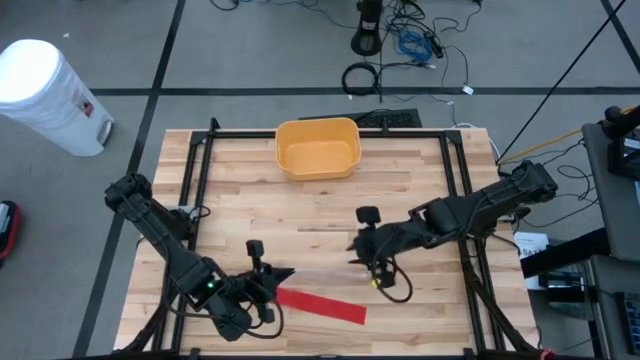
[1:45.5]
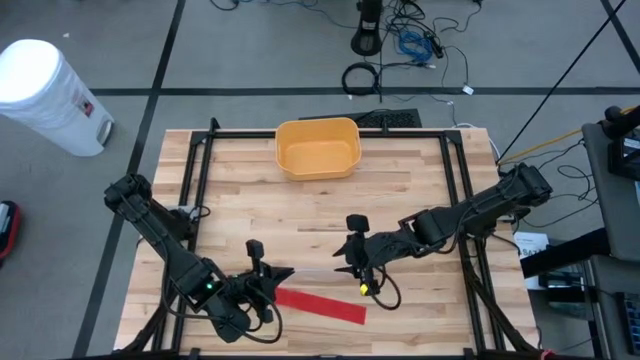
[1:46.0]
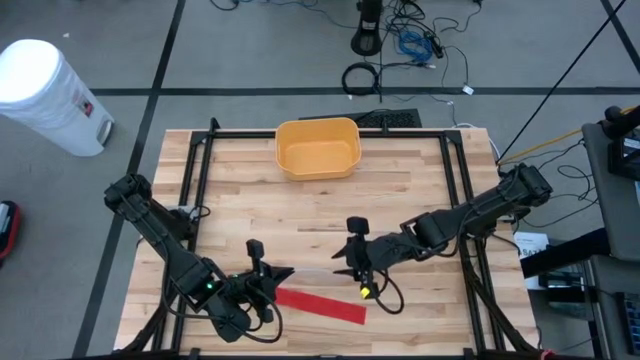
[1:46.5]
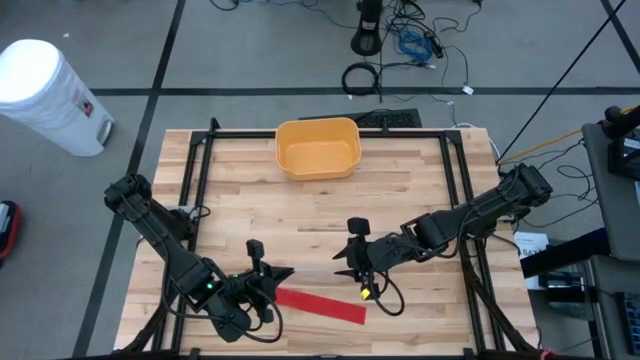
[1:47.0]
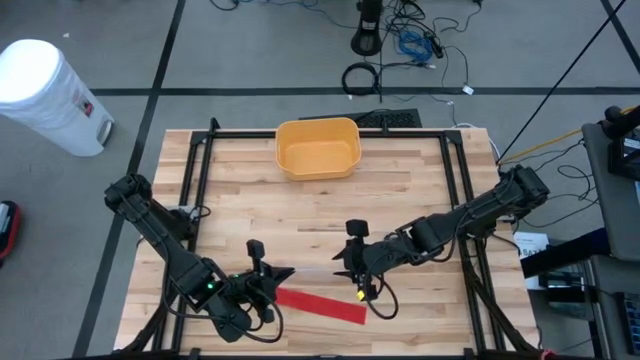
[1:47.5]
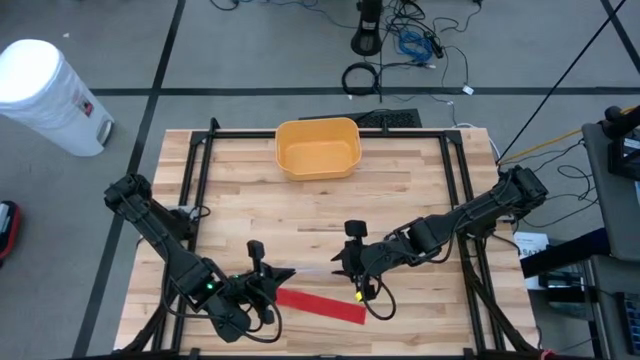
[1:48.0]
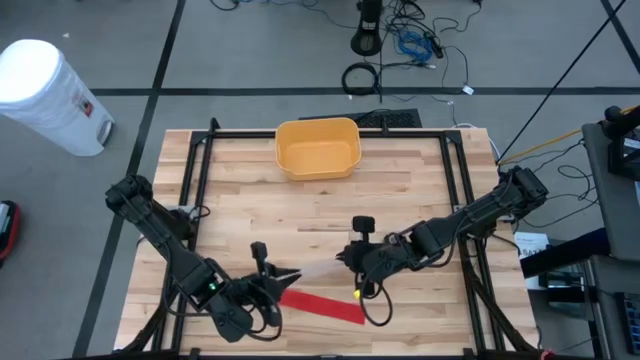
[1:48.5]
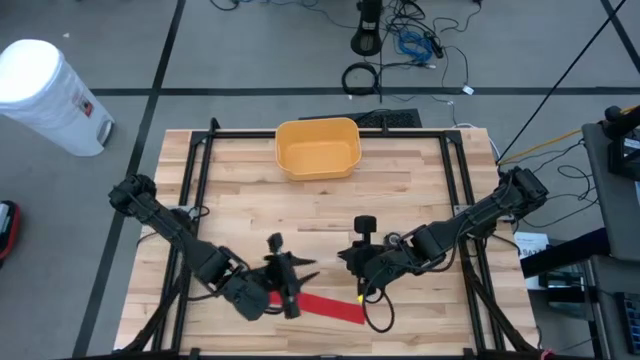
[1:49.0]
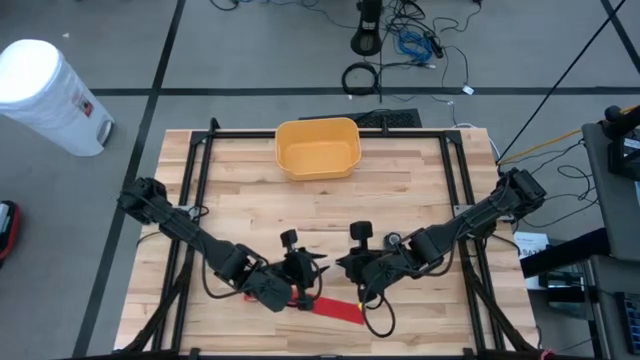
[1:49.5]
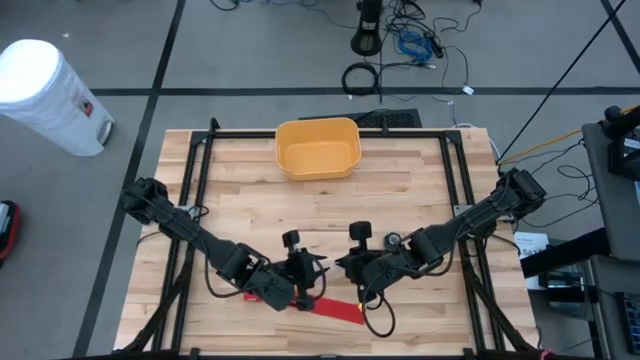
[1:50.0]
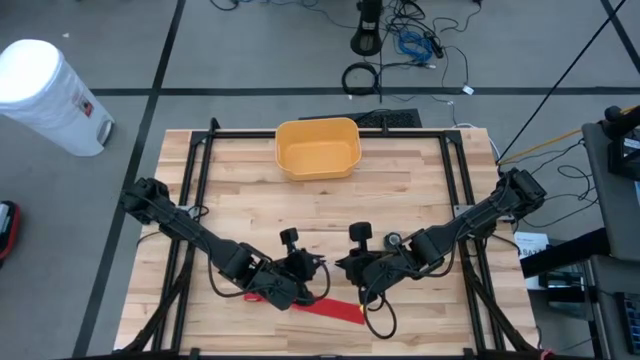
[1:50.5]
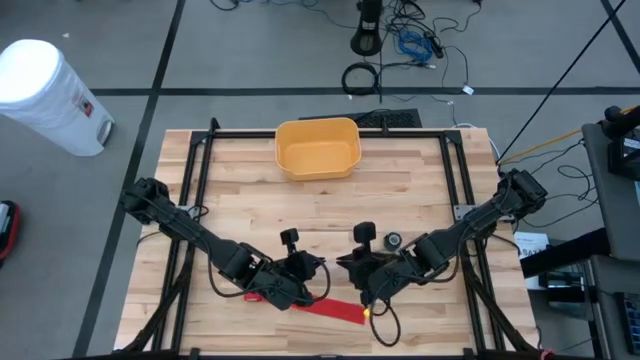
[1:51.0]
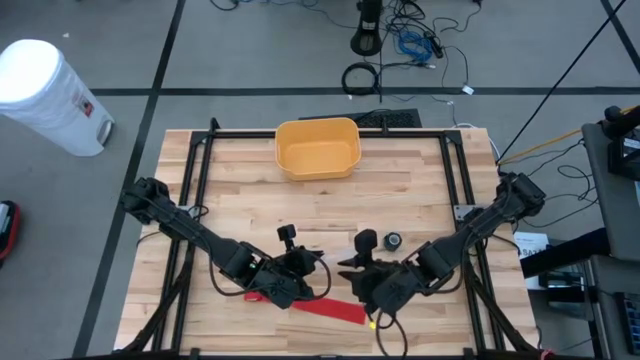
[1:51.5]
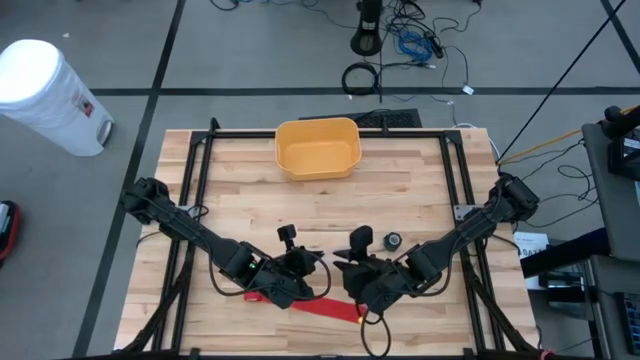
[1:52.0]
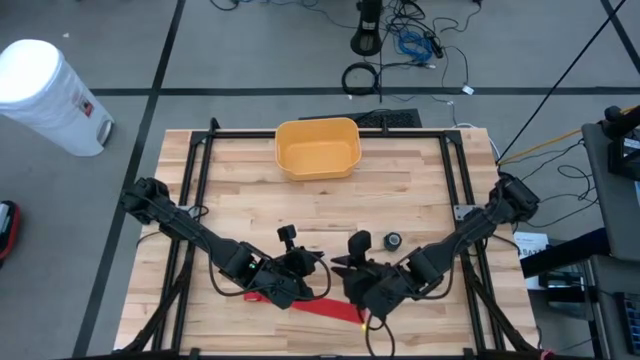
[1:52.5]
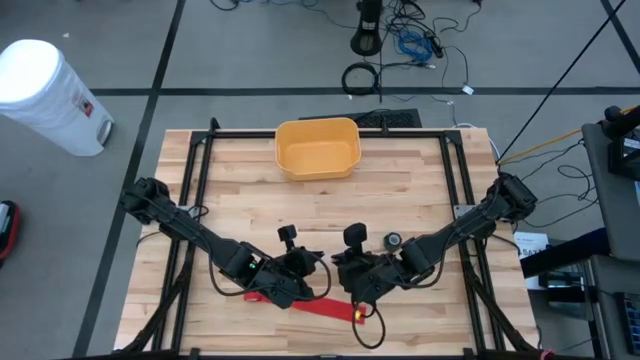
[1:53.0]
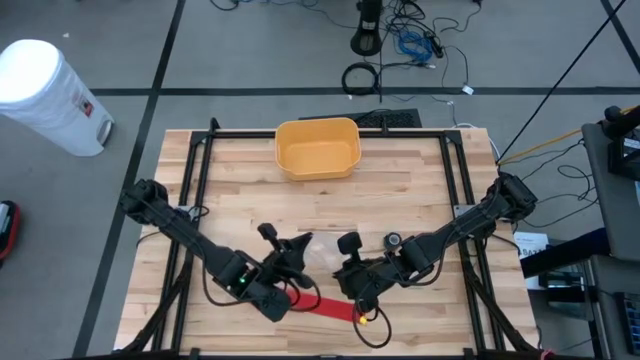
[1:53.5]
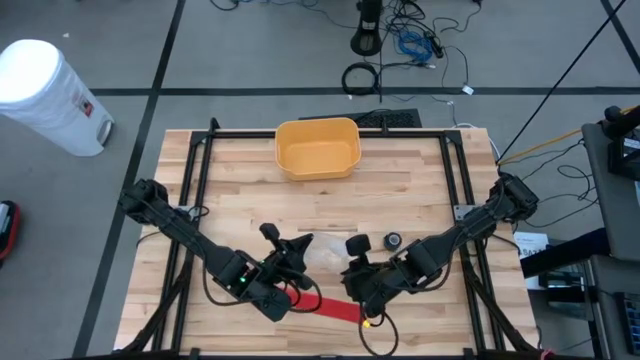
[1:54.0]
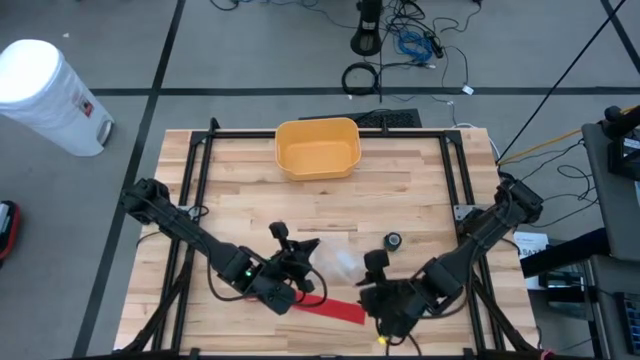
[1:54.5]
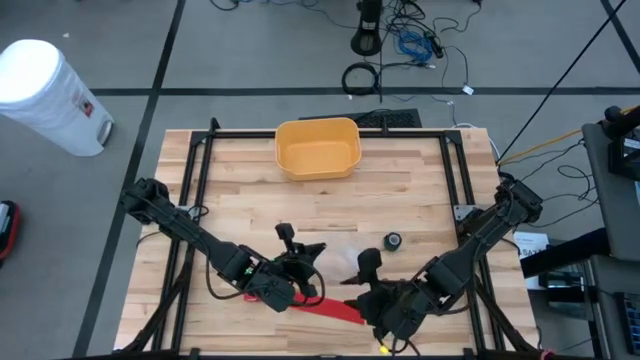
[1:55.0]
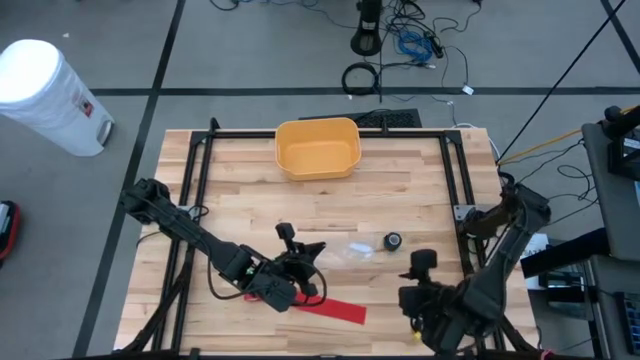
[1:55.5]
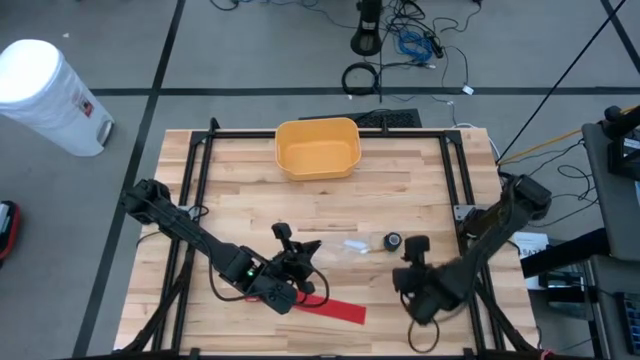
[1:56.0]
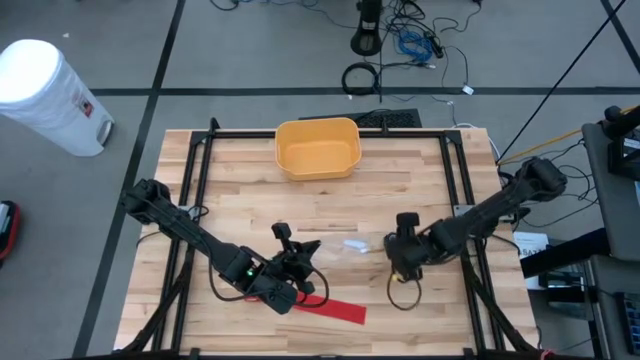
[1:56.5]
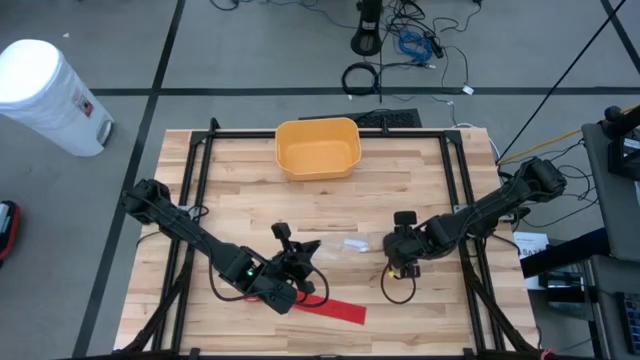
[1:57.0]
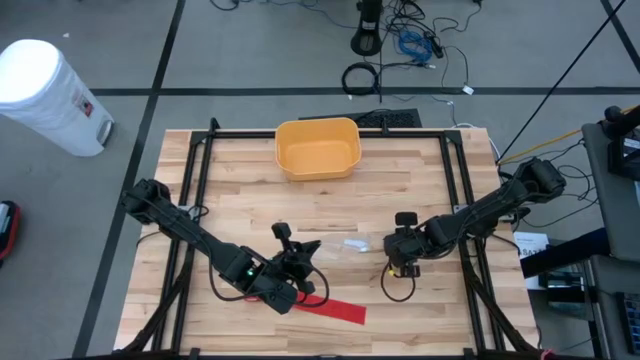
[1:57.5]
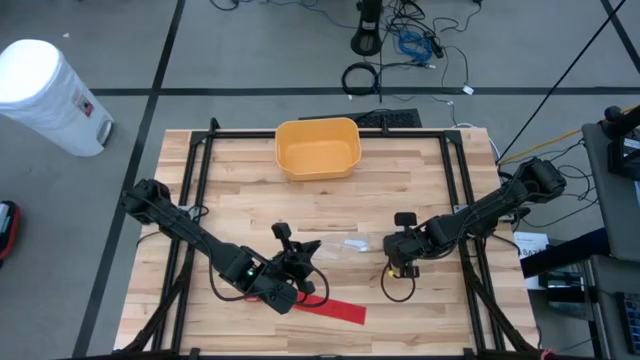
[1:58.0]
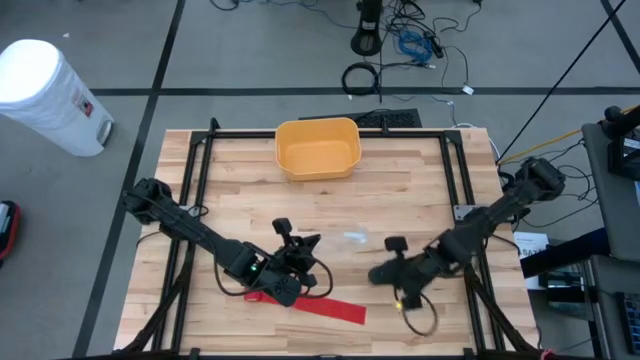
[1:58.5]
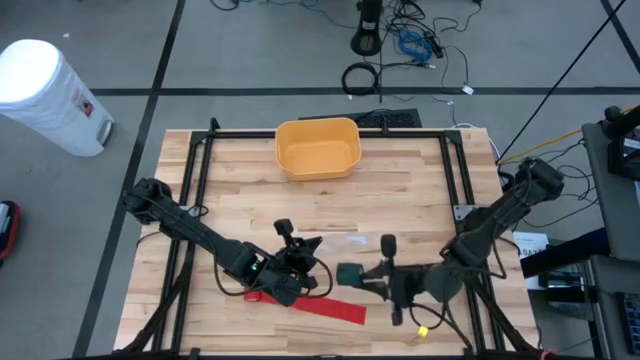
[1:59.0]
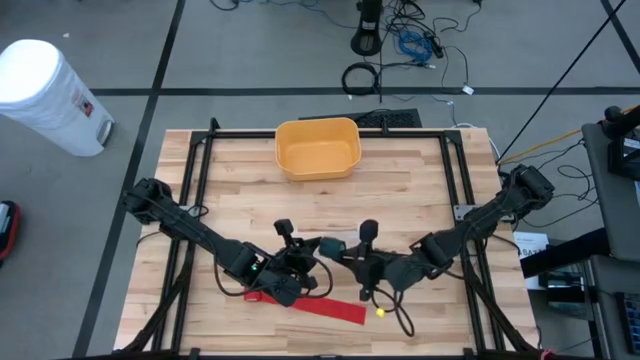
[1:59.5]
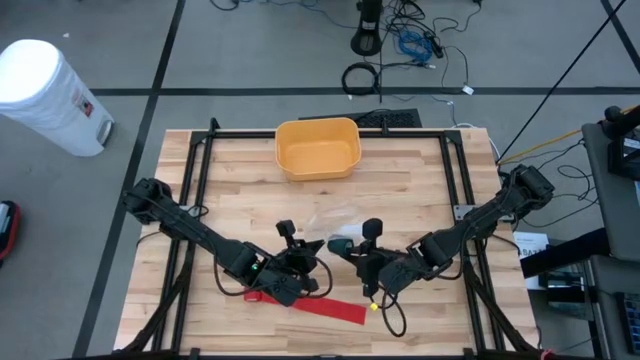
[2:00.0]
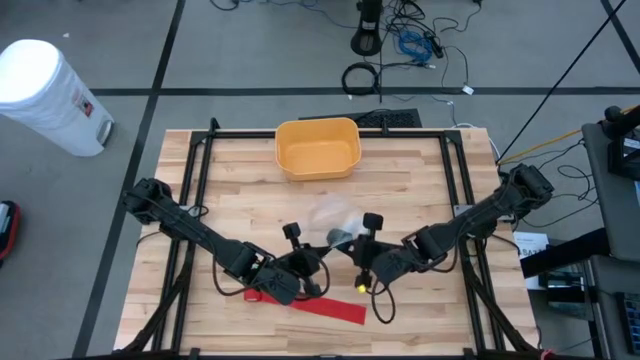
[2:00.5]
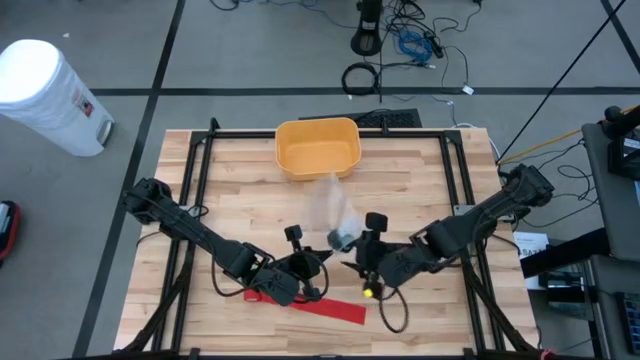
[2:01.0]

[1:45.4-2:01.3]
Task: Roll bandage
Put the green bandage into the transparent zip bag

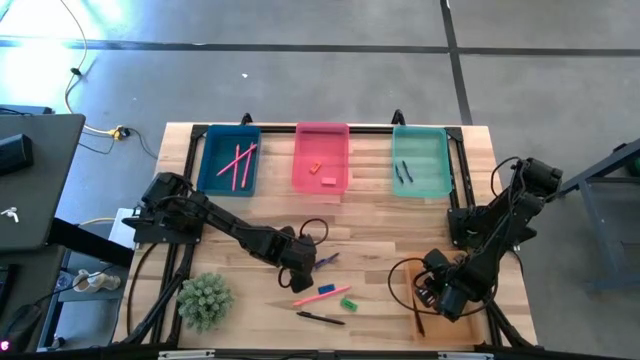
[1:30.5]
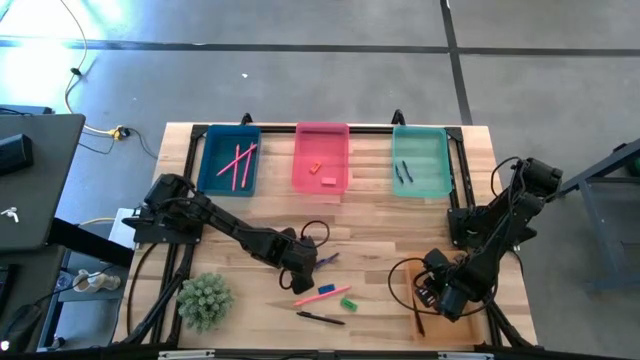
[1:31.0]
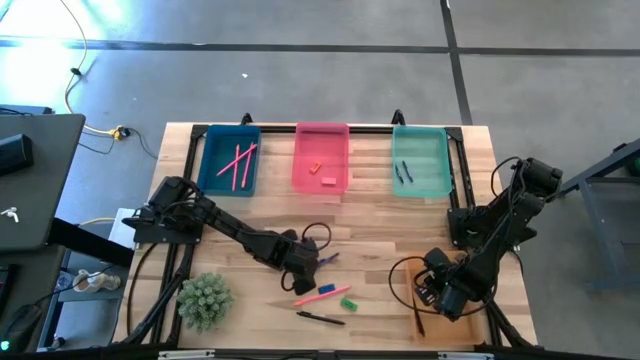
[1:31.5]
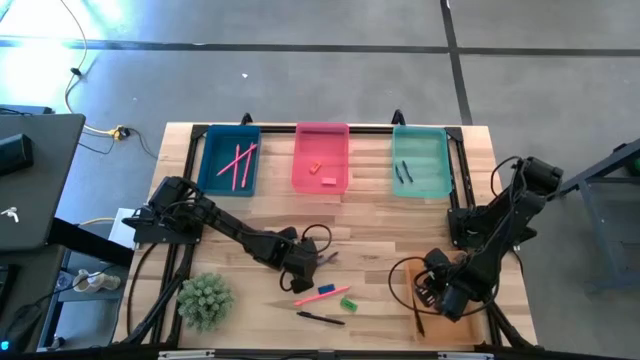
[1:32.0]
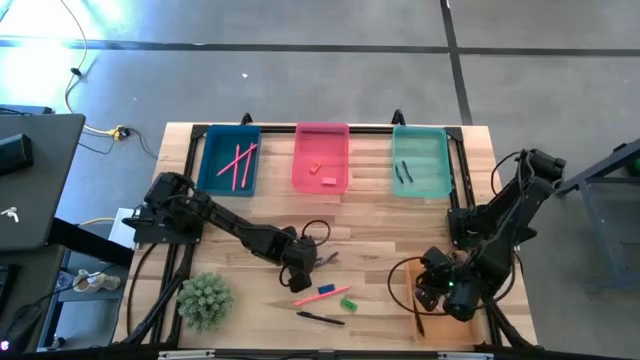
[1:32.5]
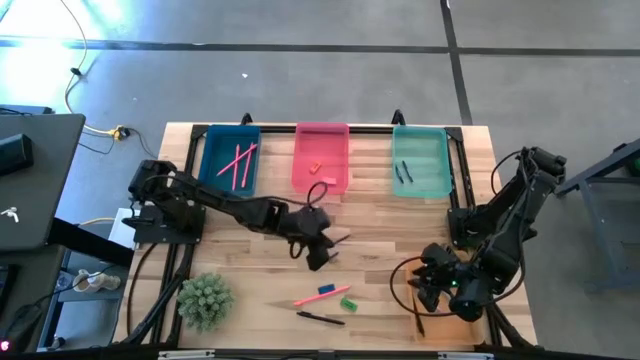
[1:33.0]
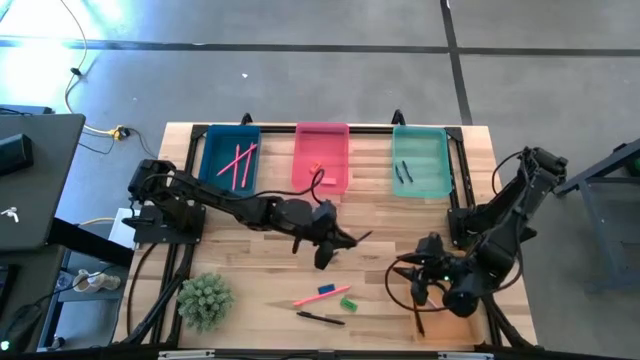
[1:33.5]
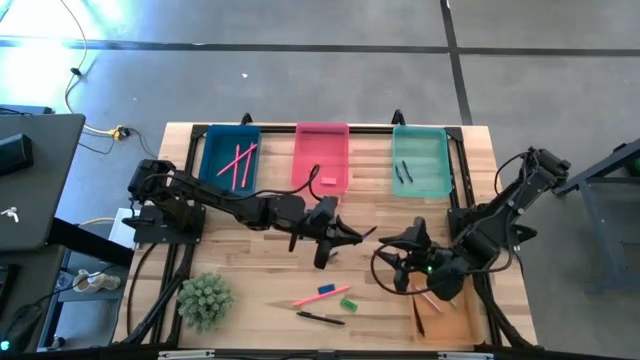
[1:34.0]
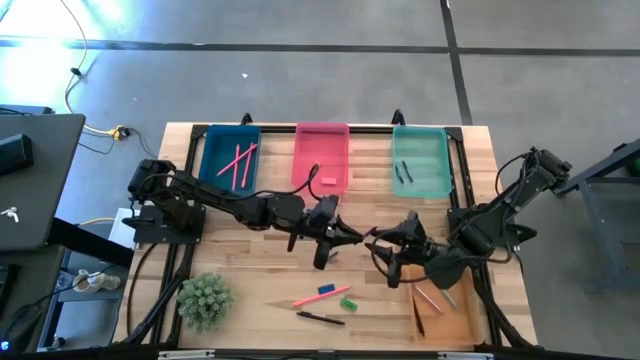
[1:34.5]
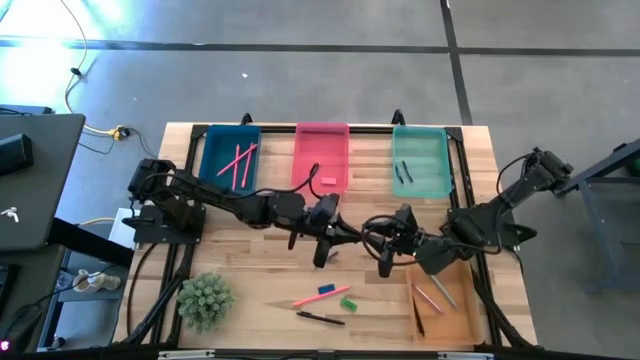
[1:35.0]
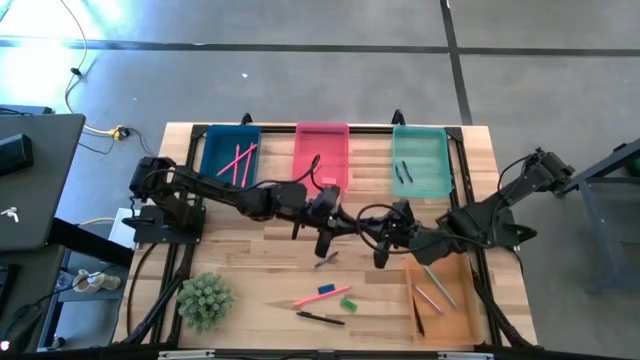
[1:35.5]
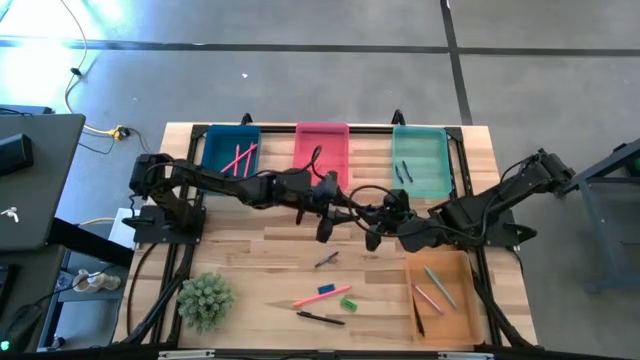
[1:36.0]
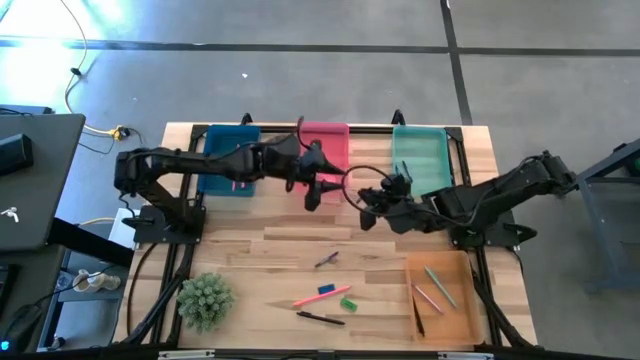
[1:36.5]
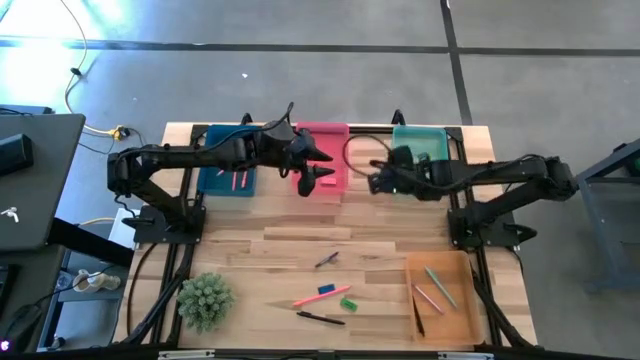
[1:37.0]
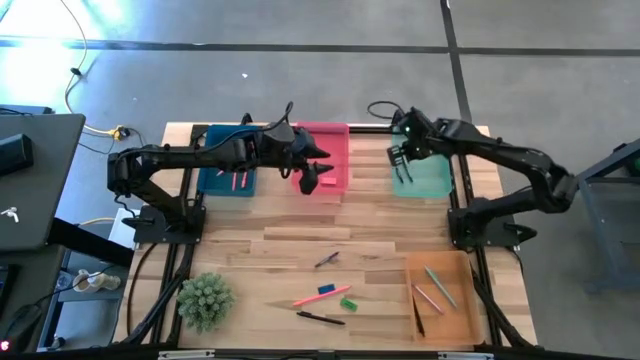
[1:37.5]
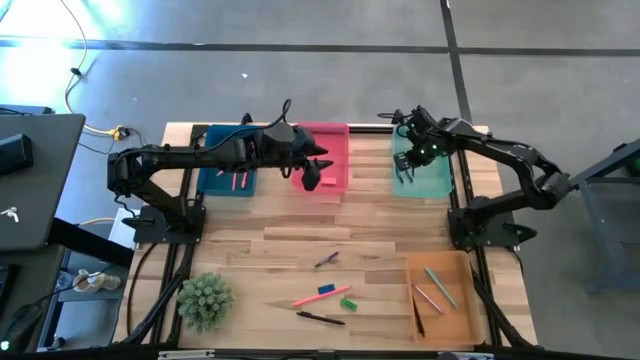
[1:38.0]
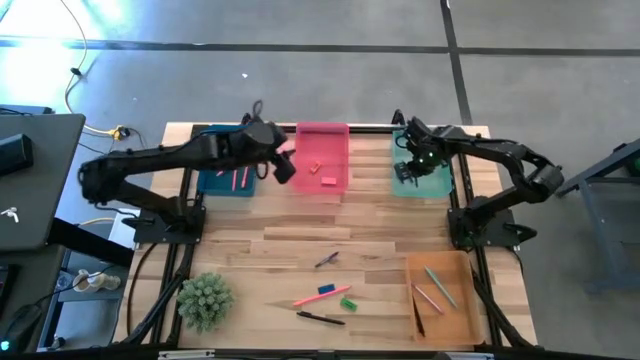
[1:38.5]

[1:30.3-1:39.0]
Task: Sort crayons/erasers/pens/pencils in bins
Put the blue crayon into the green bin
